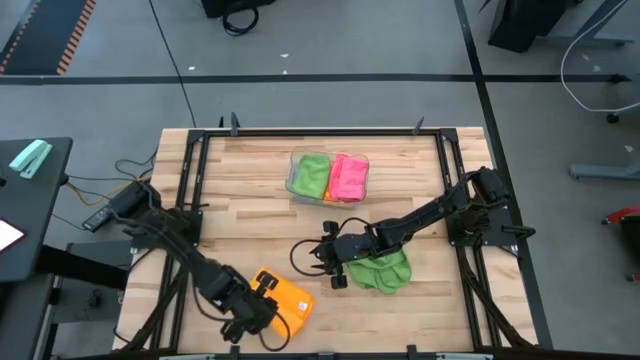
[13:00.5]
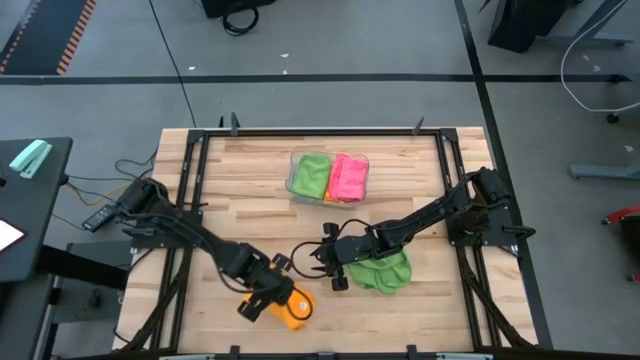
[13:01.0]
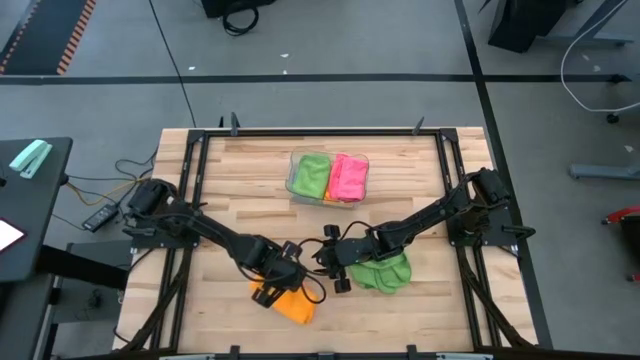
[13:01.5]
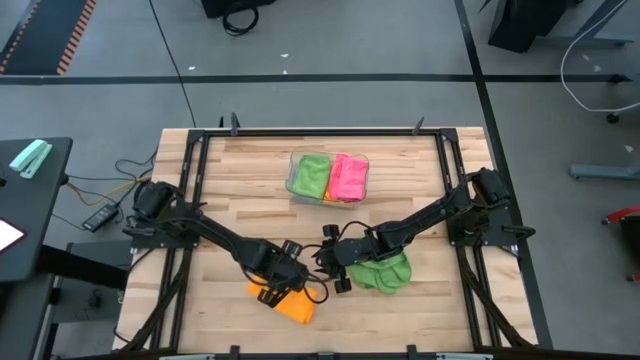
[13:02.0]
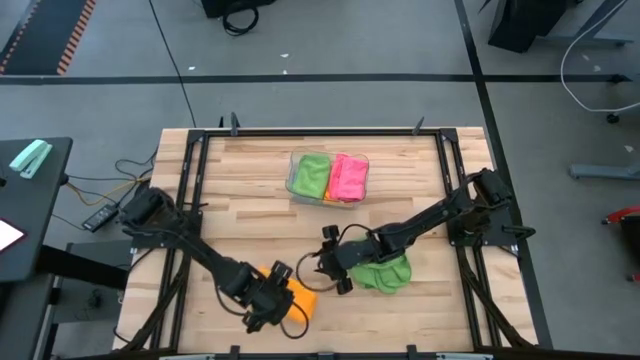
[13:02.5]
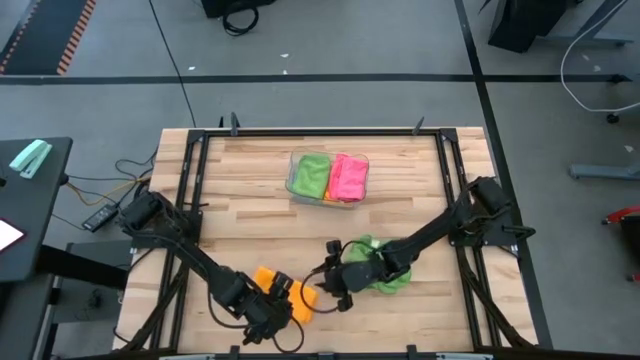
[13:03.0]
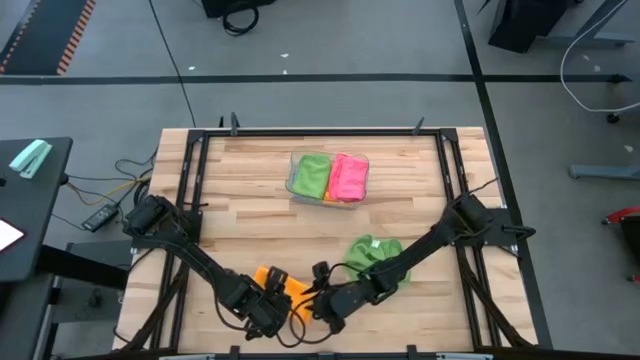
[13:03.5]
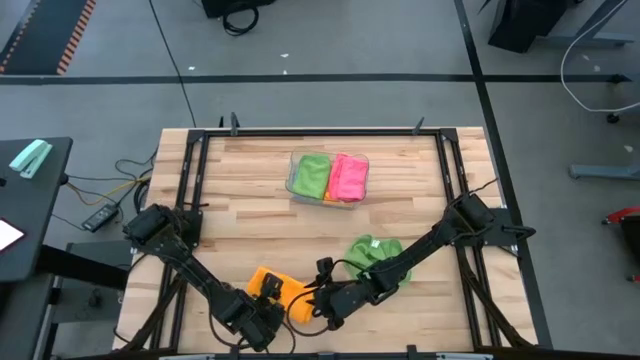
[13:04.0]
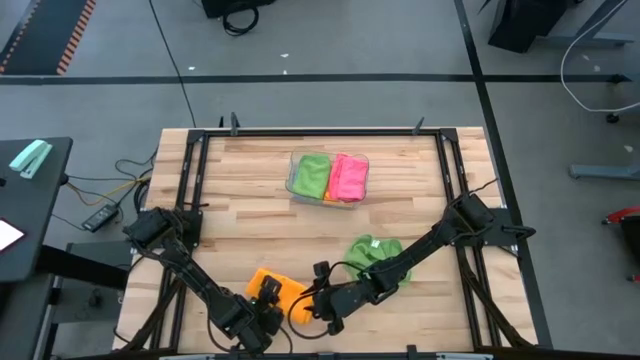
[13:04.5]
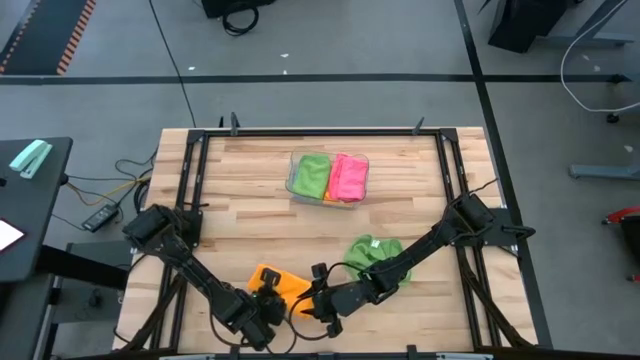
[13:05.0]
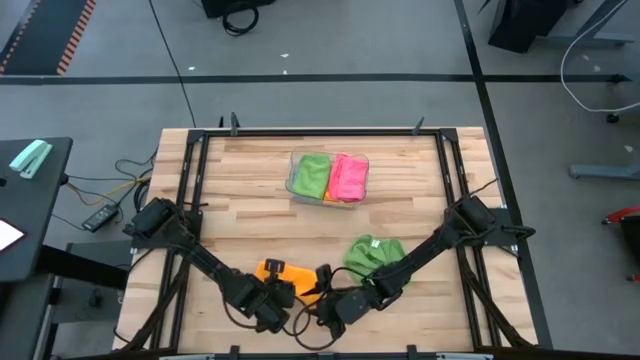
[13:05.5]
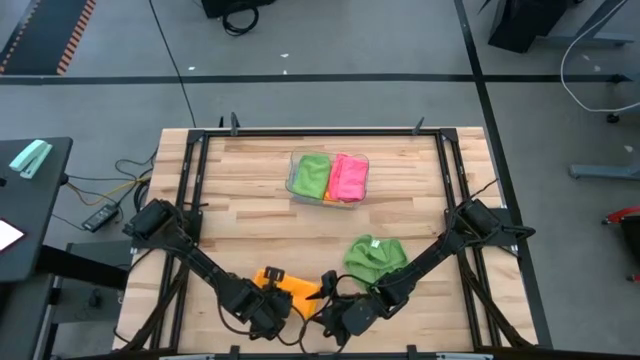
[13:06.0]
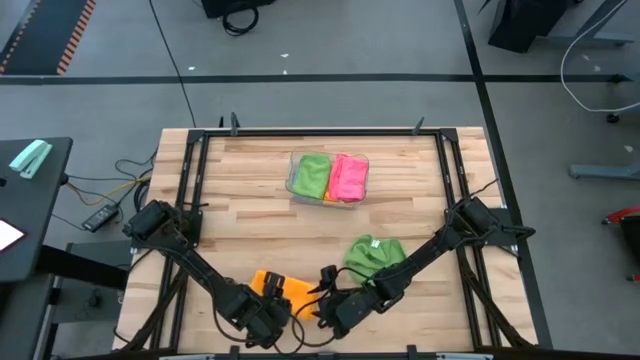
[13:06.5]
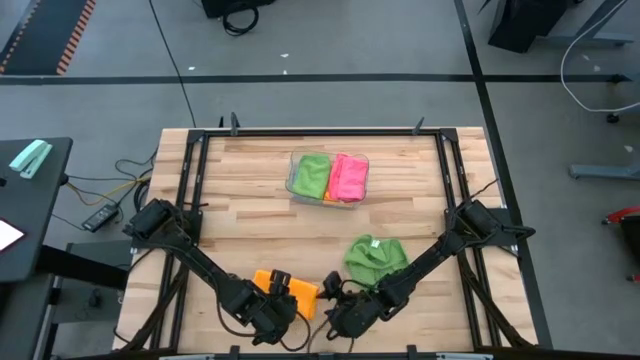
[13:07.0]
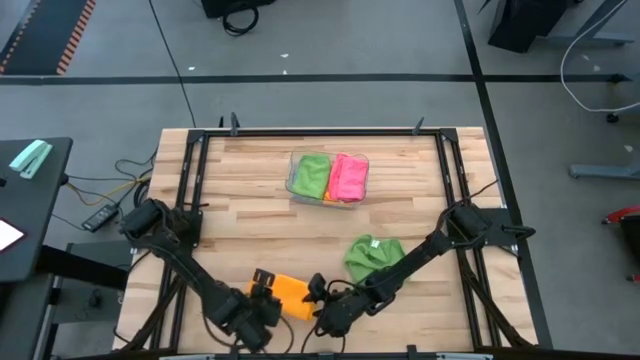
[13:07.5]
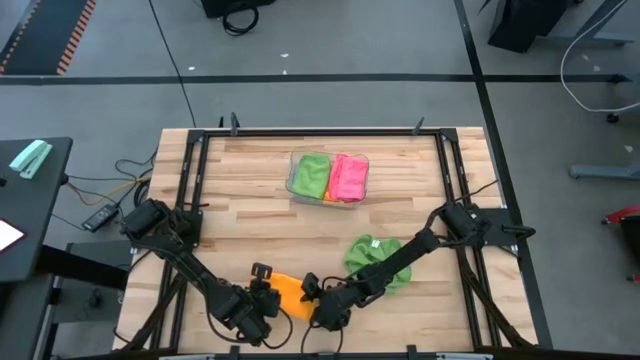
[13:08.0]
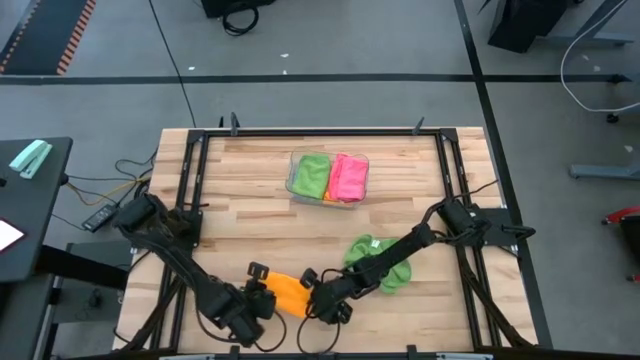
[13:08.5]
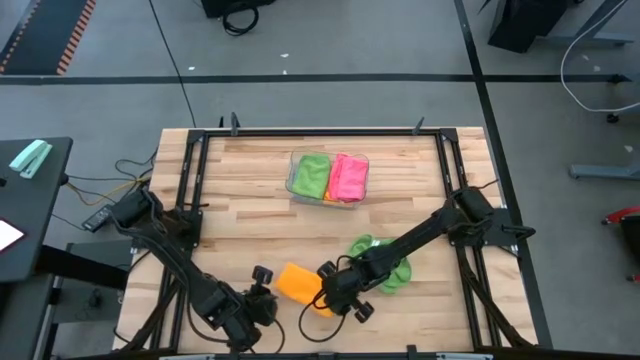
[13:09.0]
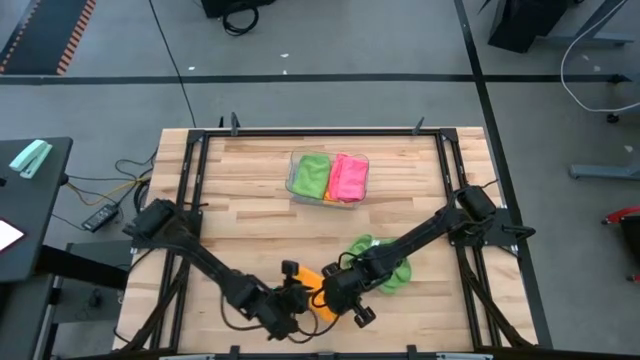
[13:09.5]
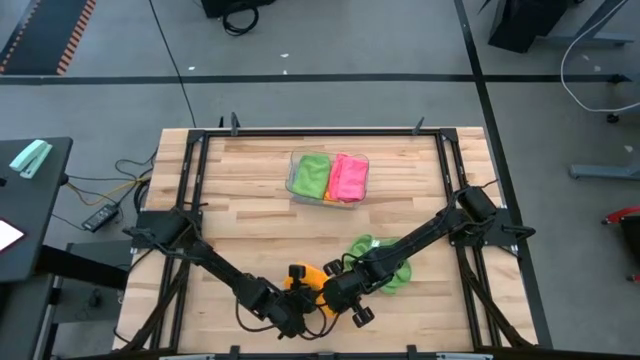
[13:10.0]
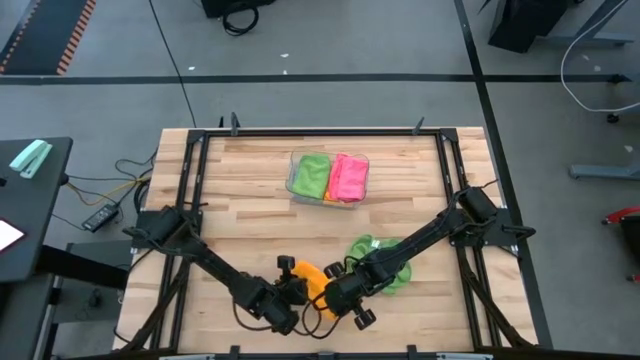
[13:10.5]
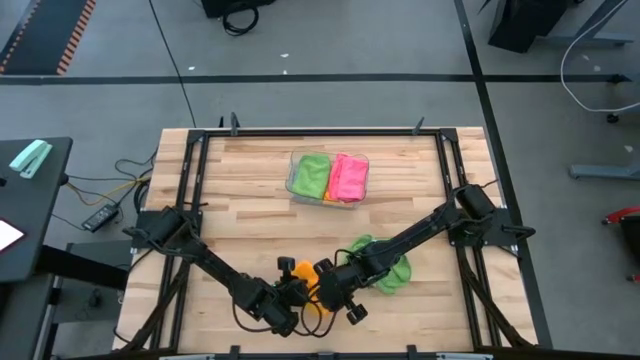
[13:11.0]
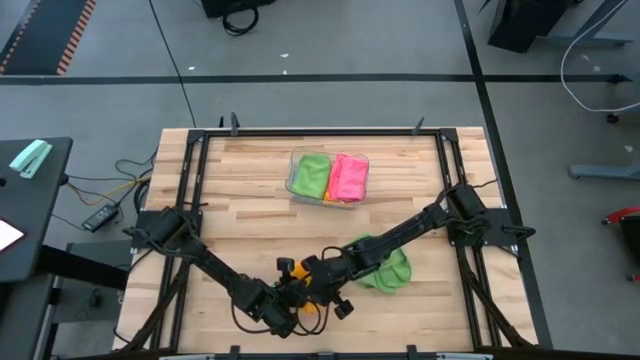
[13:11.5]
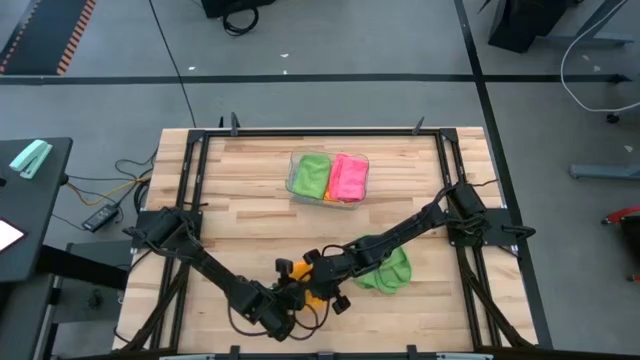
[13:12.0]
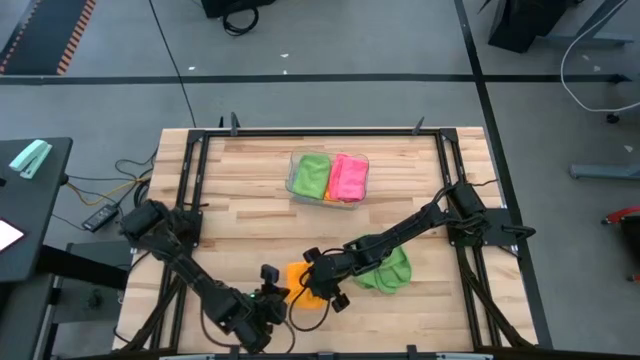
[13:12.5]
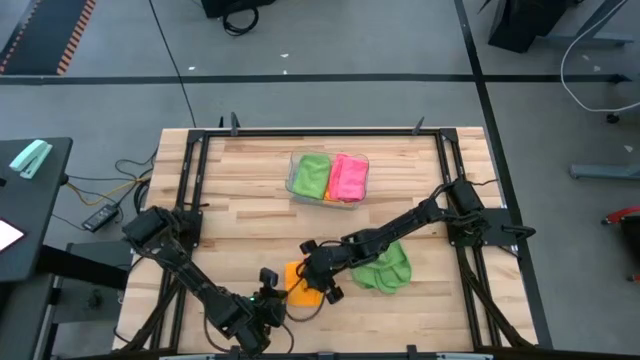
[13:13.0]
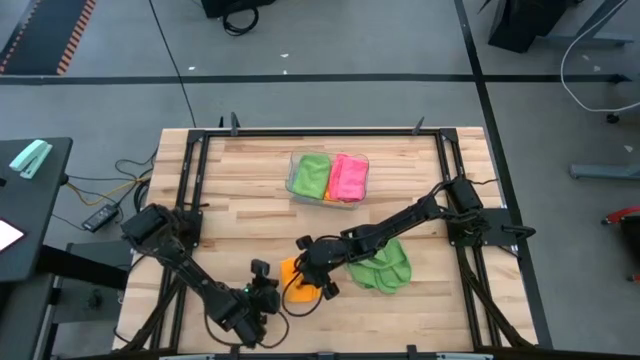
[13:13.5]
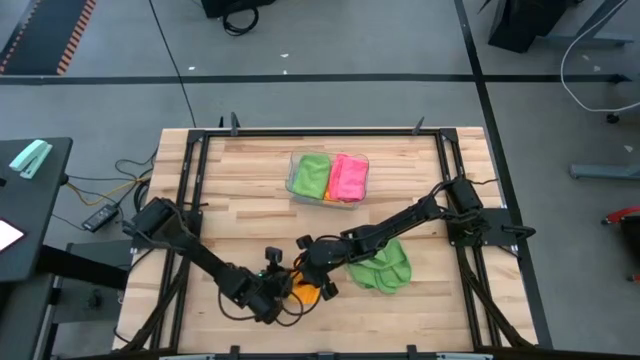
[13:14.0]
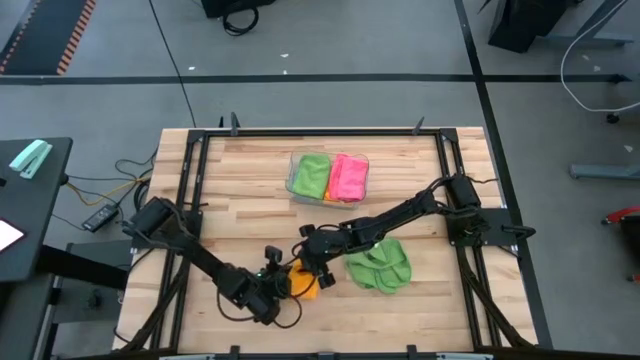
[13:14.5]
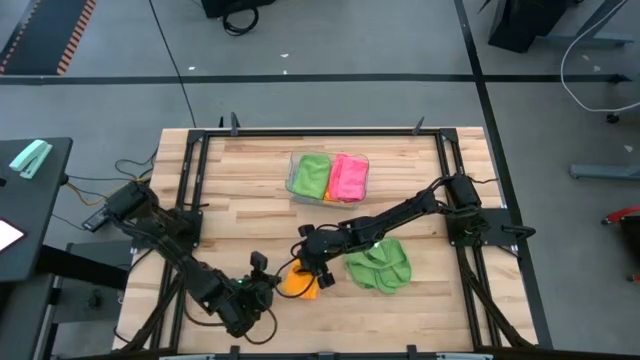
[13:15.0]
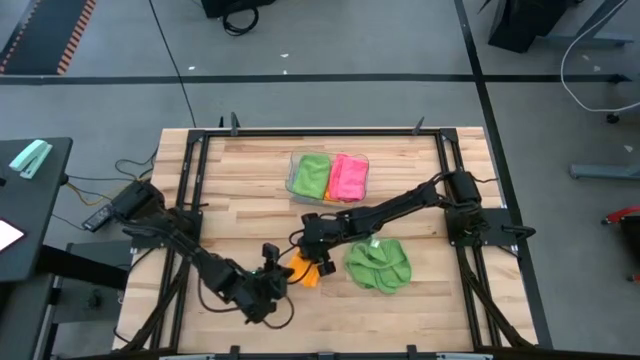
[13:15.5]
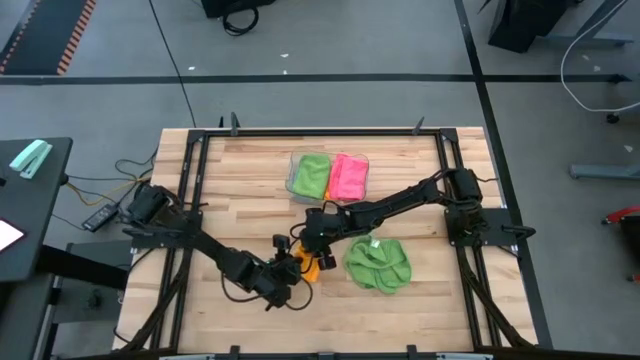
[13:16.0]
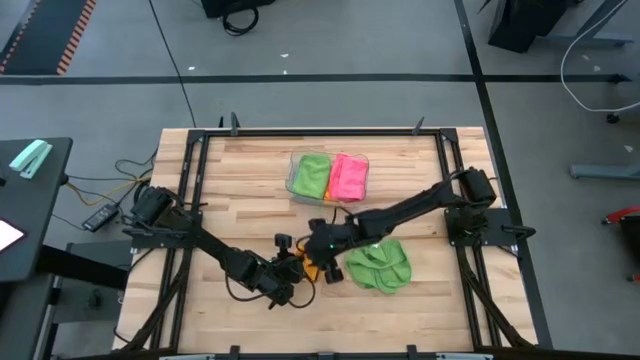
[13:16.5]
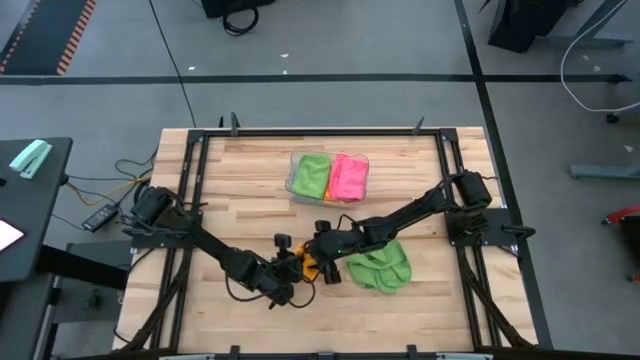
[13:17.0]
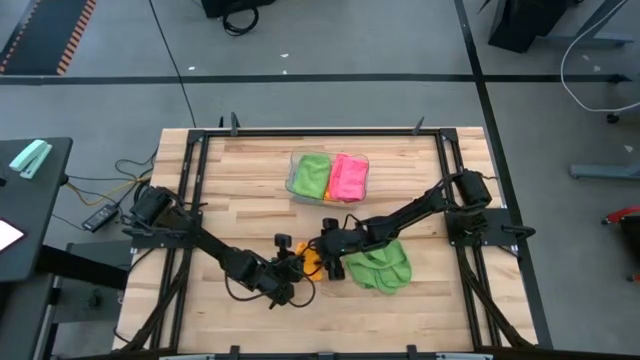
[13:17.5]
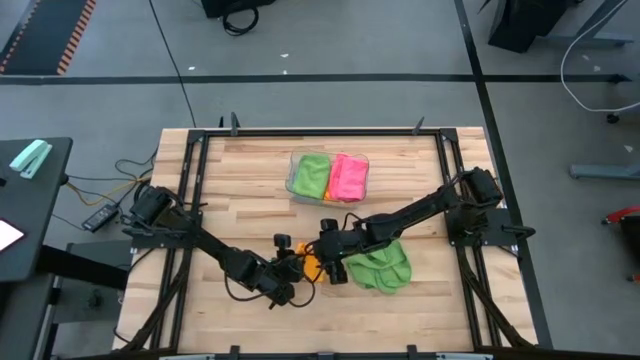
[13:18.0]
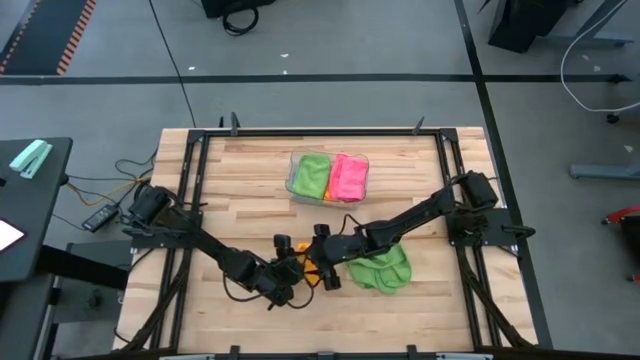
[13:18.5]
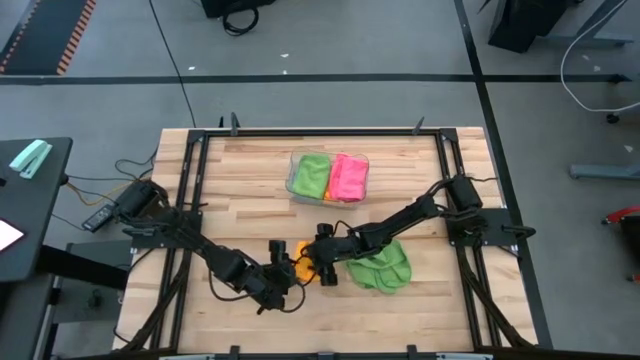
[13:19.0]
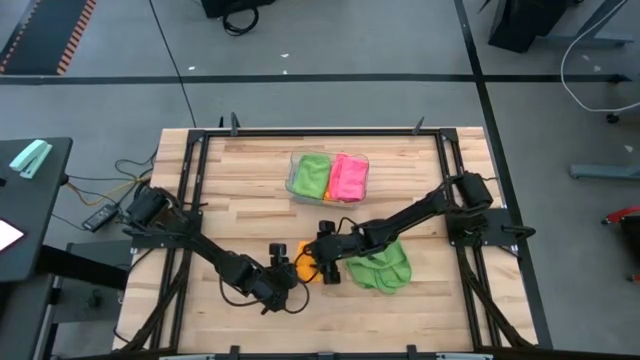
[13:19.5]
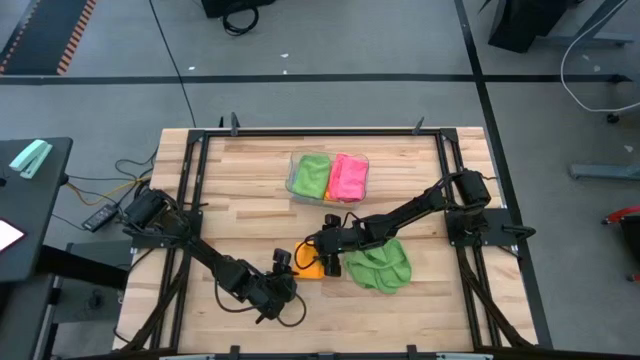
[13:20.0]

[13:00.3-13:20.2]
Task: Fold microfiber towels
Fold the yellow microfiber cloth
